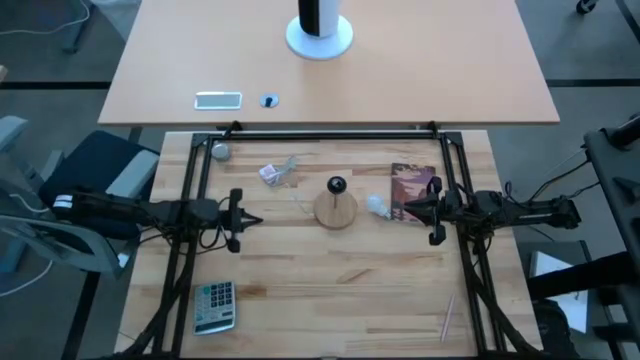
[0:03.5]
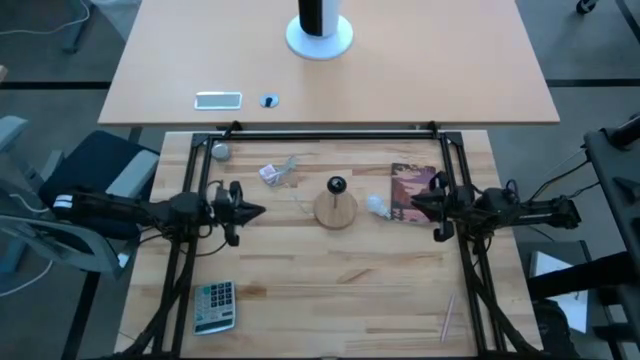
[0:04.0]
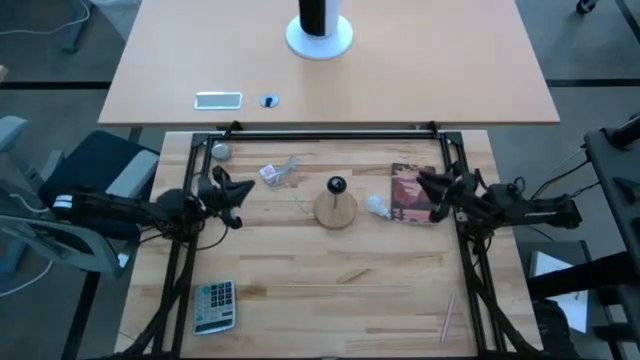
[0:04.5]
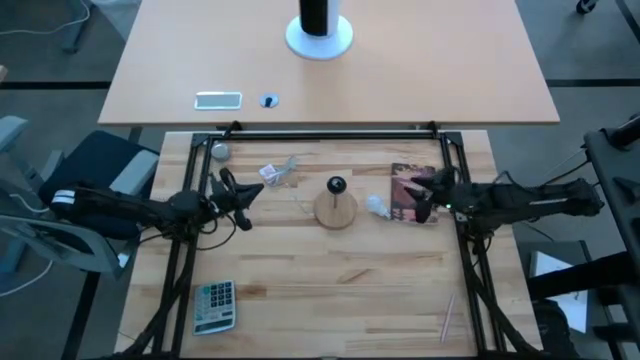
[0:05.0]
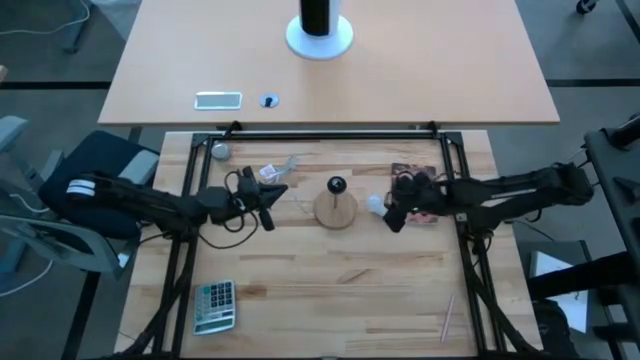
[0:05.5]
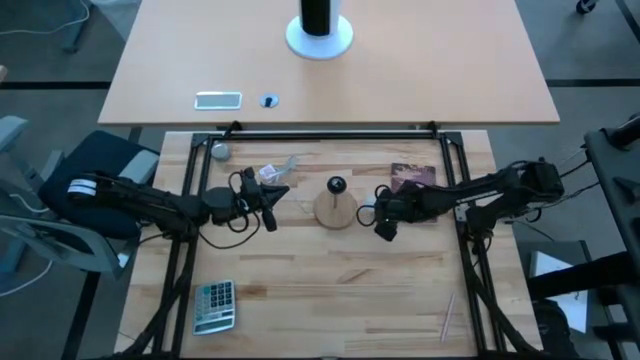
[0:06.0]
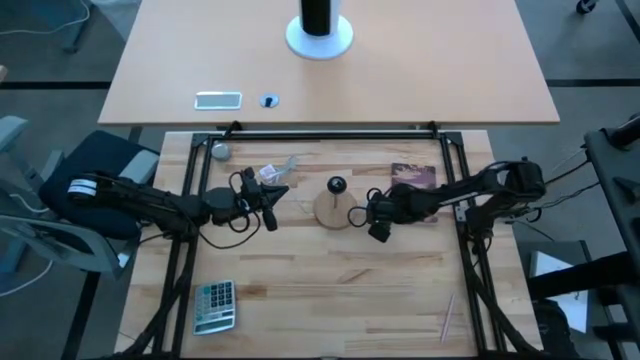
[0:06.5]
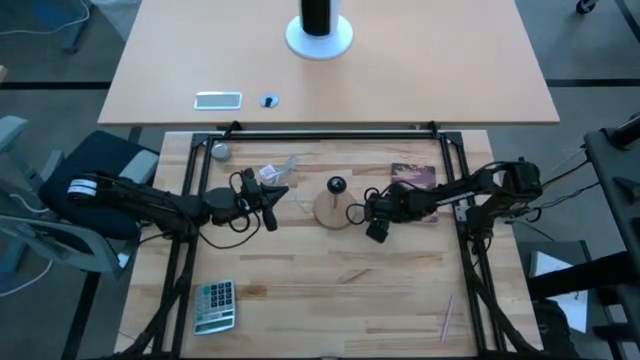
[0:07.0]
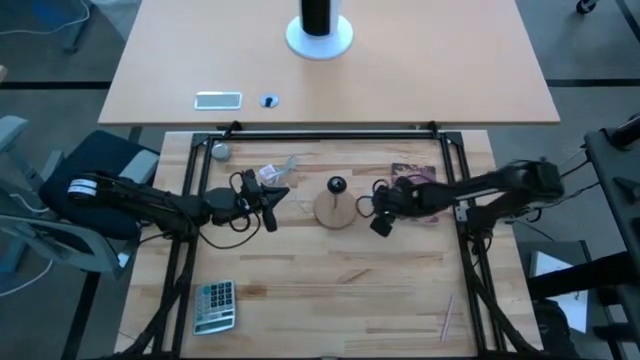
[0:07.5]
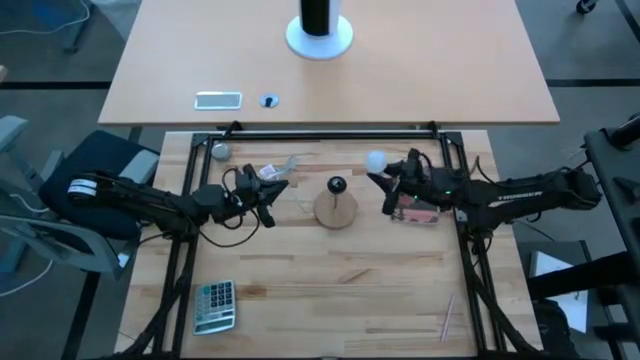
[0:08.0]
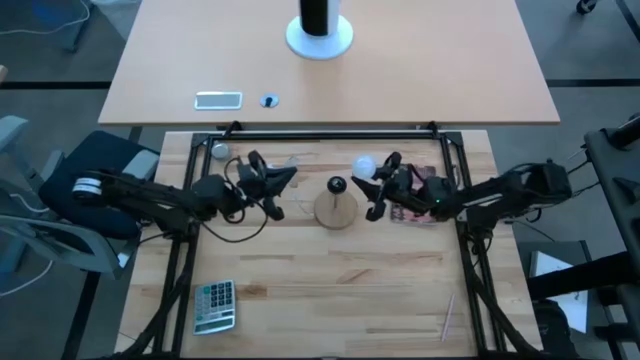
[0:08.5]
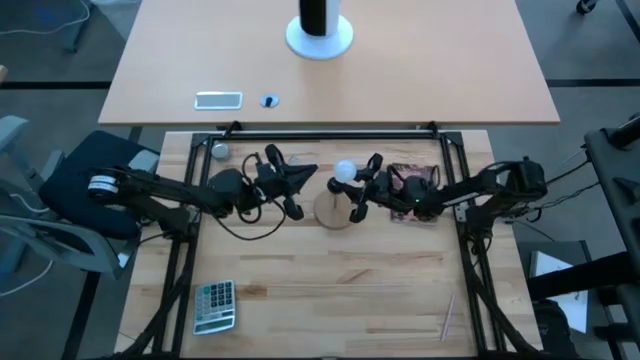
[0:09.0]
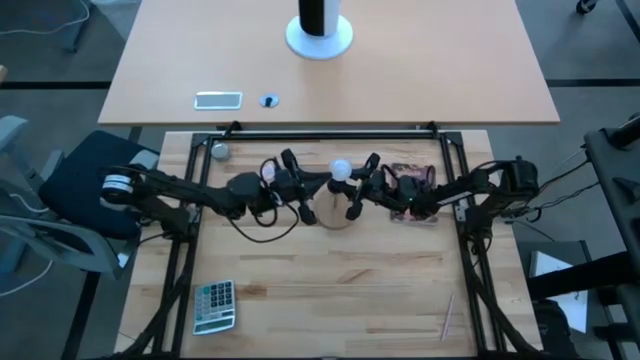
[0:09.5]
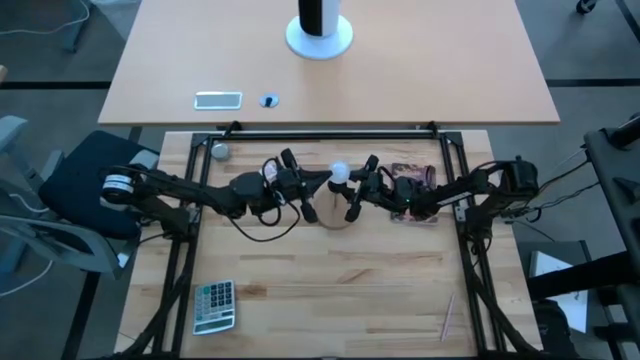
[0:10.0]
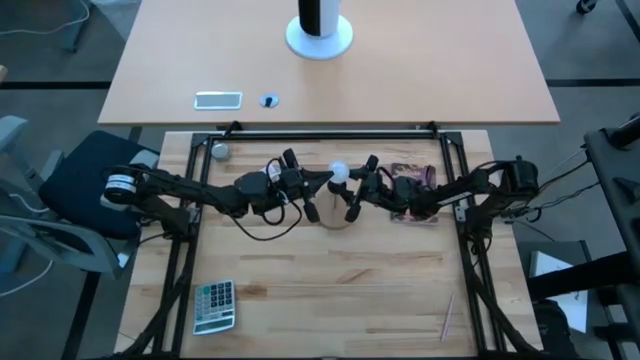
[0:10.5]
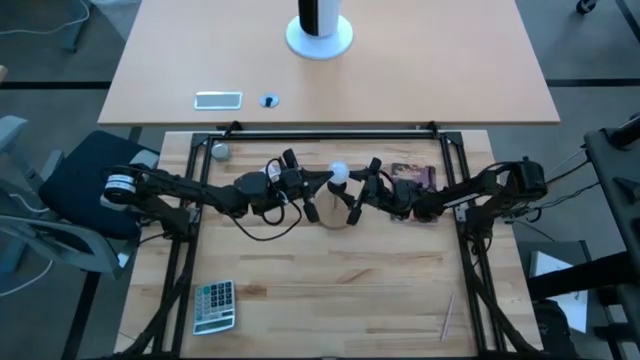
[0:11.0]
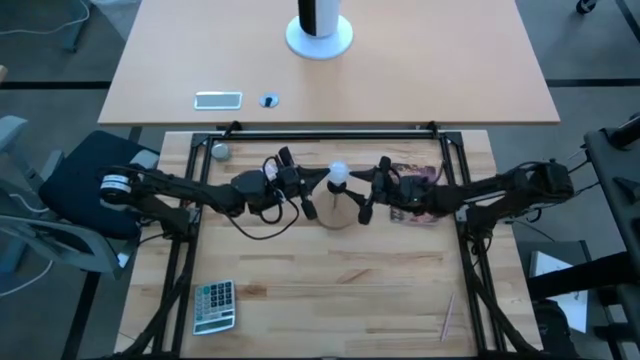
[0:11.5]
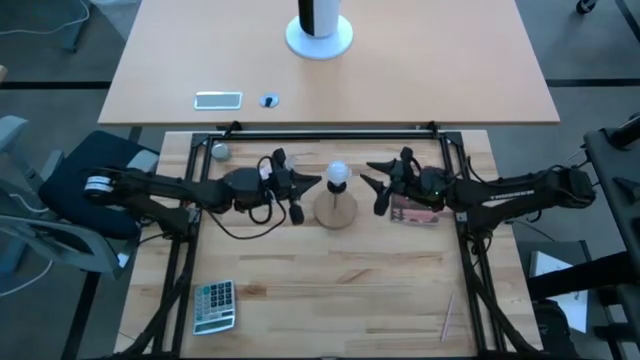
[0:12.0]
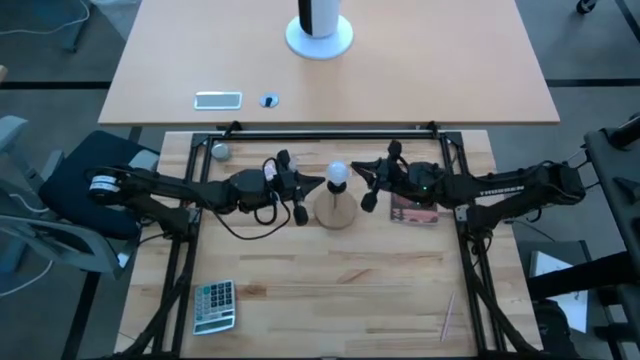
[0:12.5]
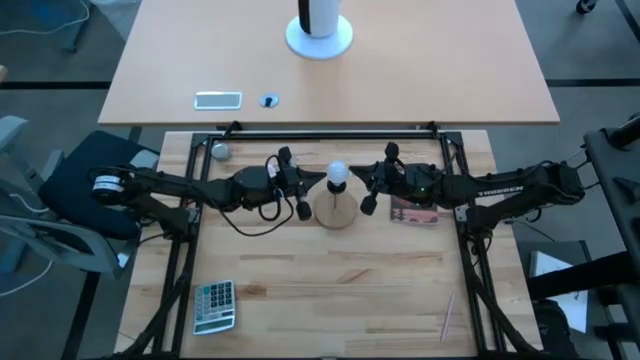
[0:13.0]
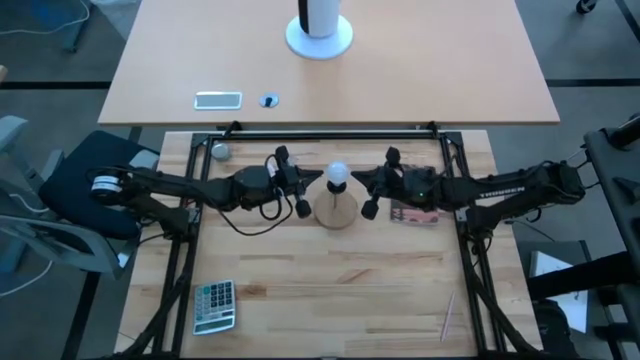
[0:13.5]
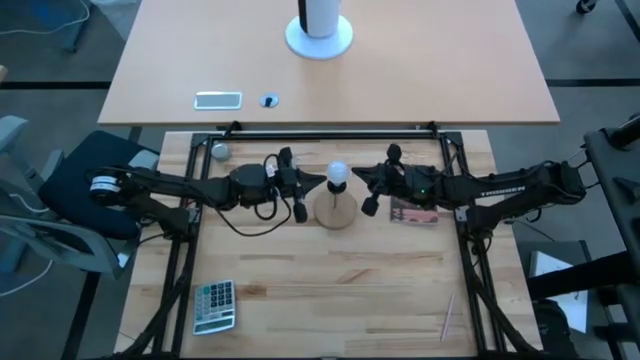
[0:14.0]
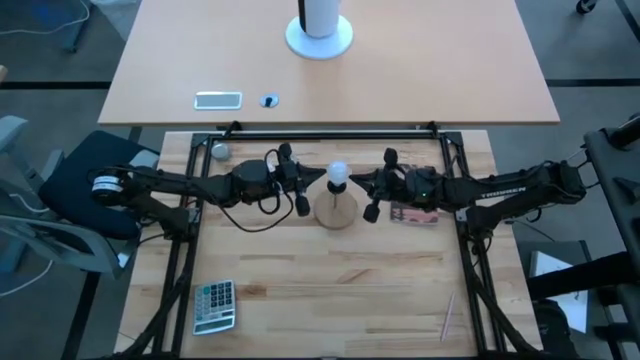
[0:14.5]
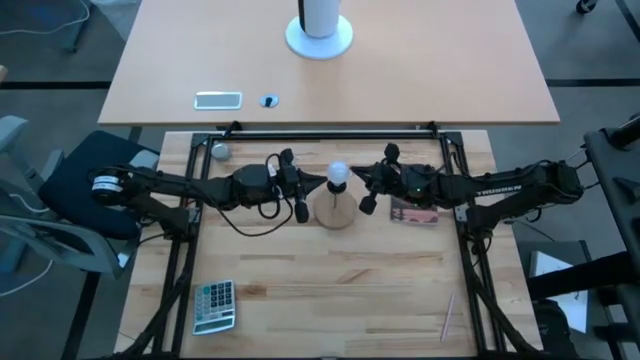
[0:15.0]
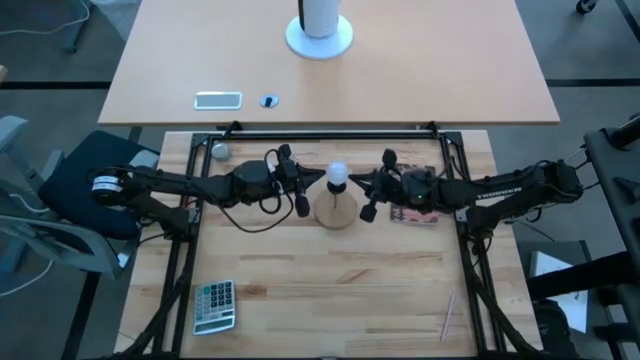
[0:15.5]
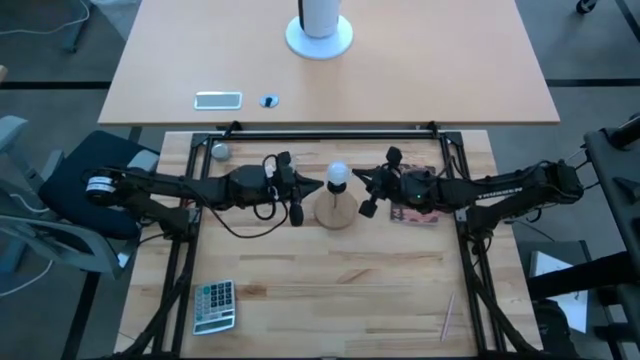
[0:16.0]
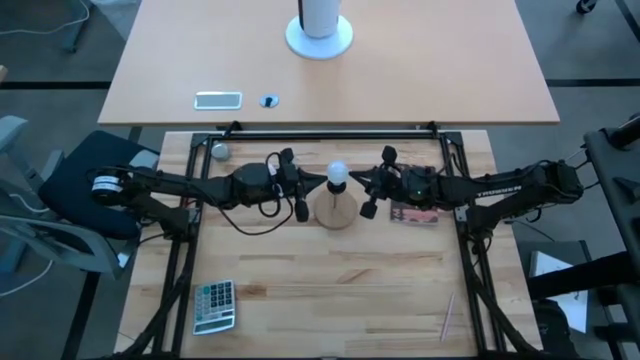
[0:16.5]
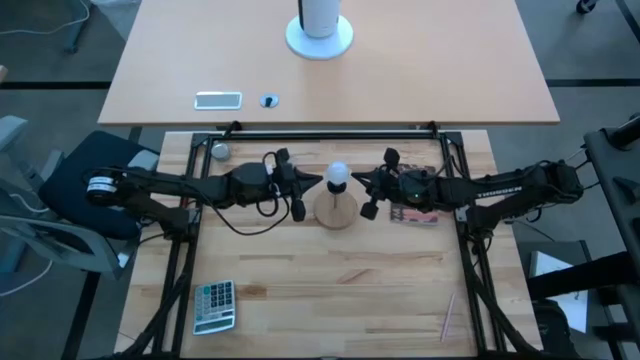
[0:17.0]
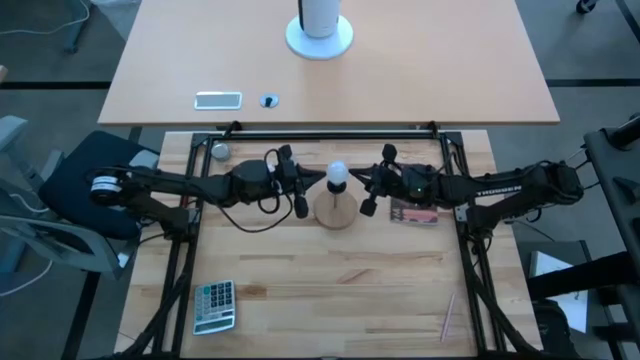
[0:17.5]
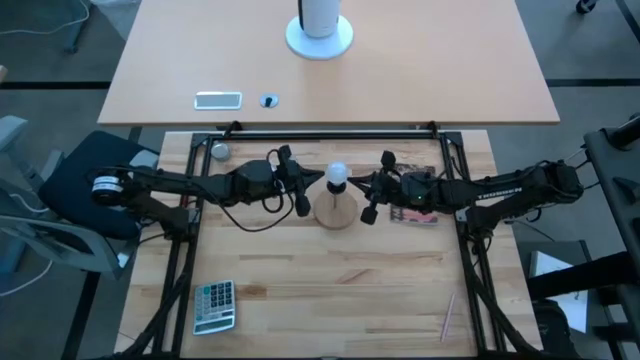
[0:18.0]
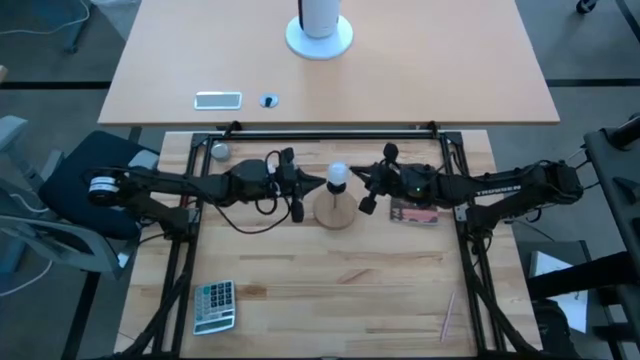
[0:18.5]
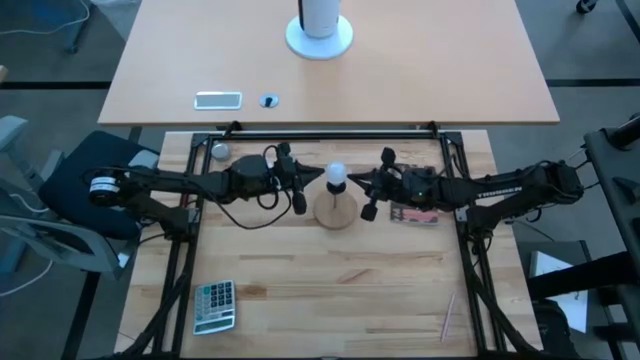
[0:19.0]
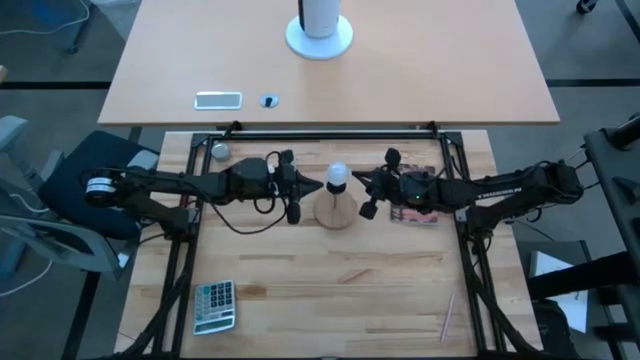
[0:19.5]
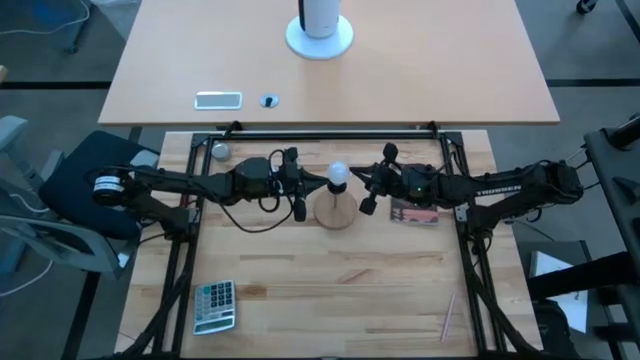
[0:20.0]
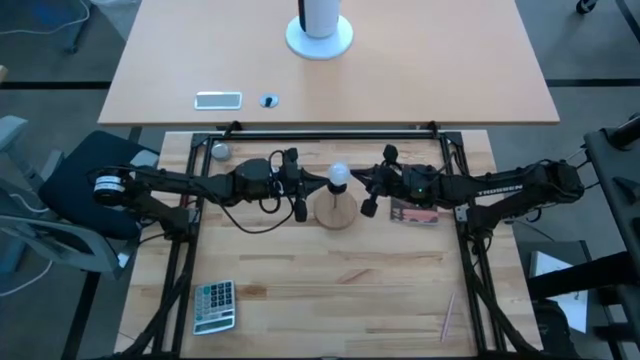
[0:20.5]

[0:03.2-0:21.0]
Task: Screw lightbulb
Insert the lightbulb into the lamp

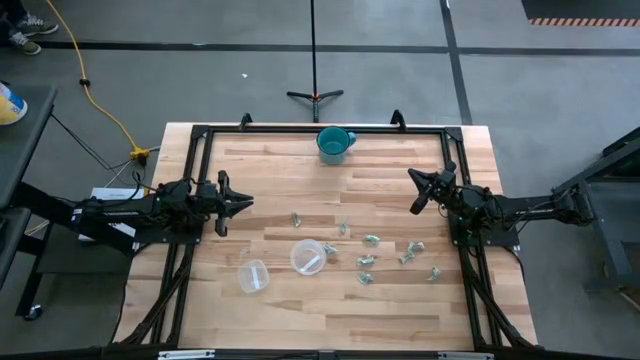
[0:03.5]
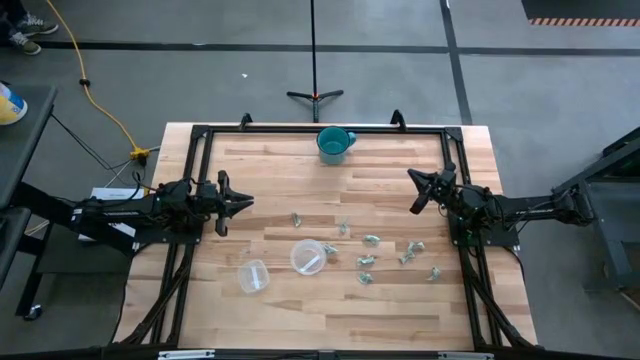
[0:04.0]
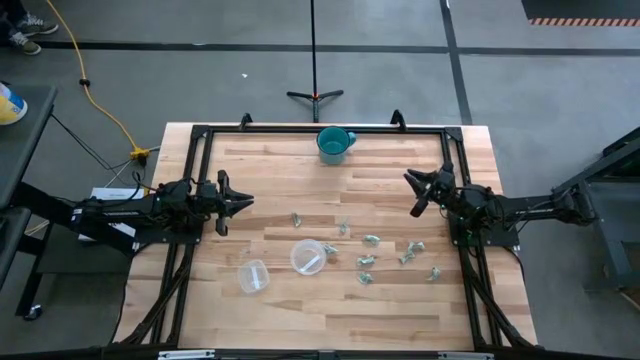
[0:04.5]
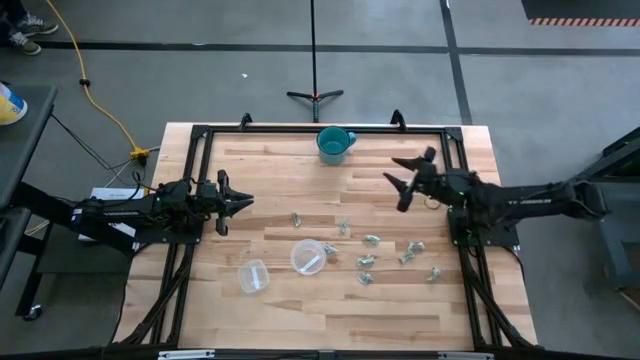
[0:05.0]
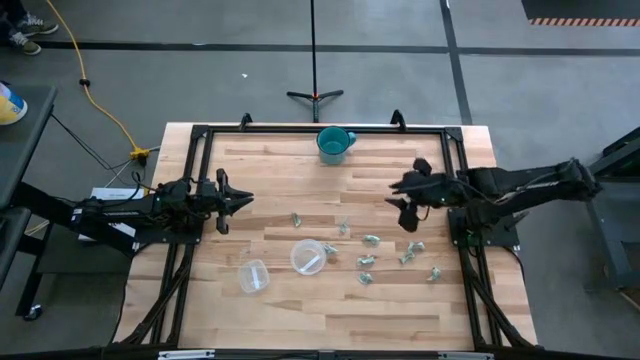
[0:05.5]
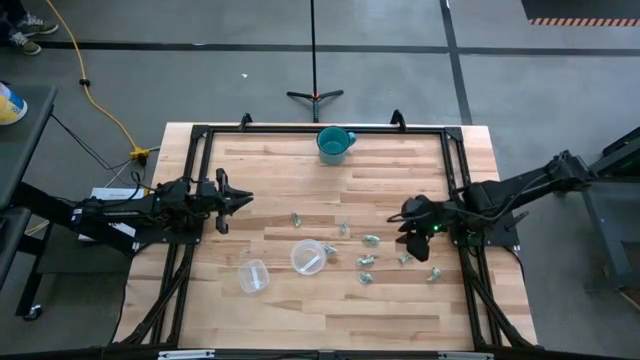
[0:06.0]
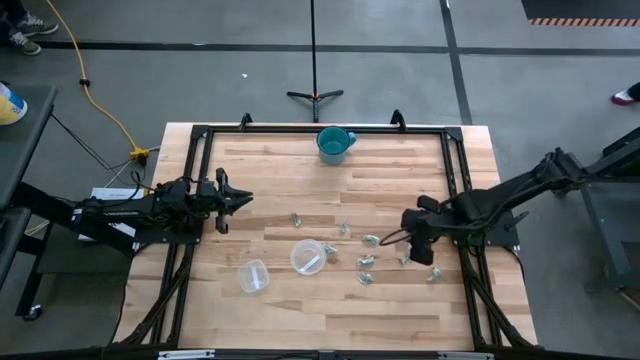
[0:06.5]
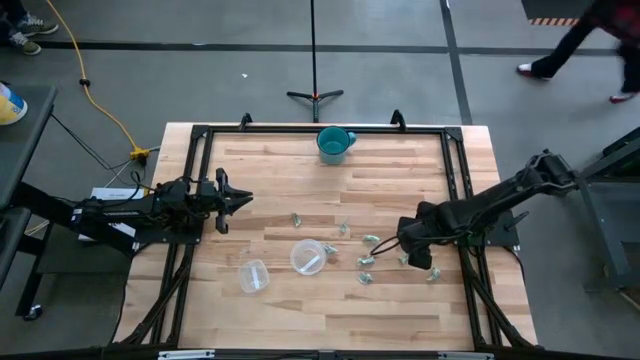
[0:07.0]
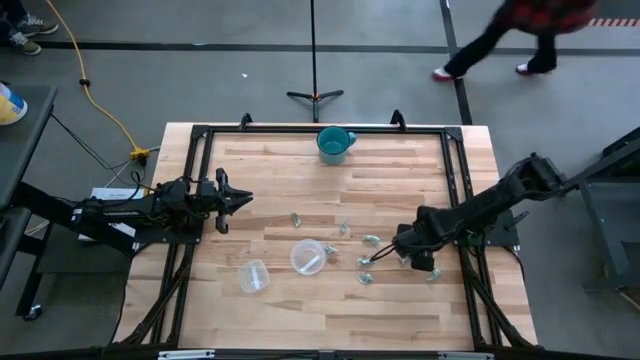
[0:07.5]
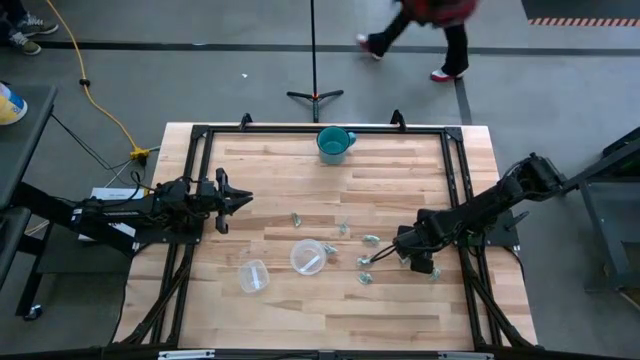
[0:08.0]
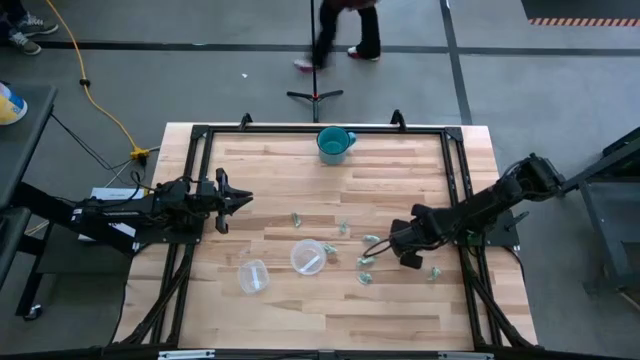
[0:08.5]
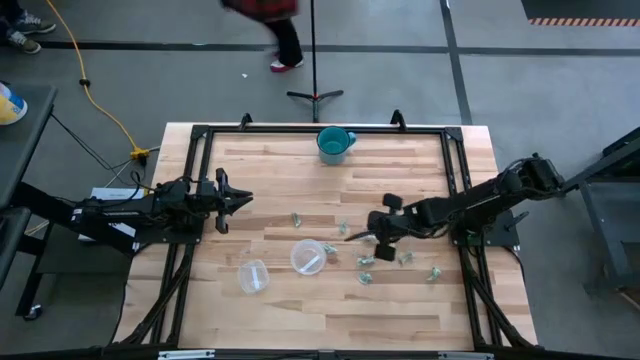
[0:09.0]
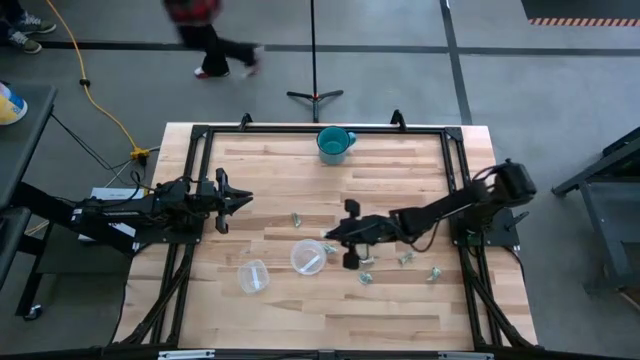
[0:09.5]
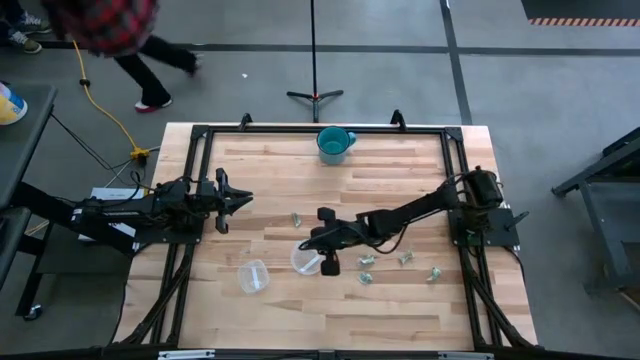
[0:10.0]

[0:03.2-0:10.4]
Task: Pick and place items into bin
Put the stevia packet into the right transparent bin
